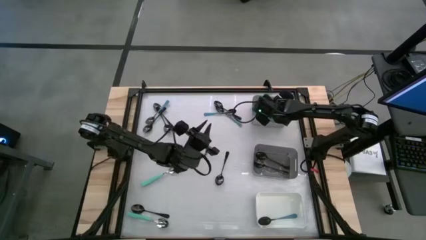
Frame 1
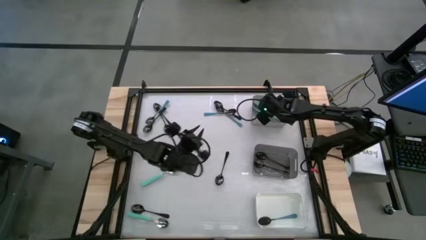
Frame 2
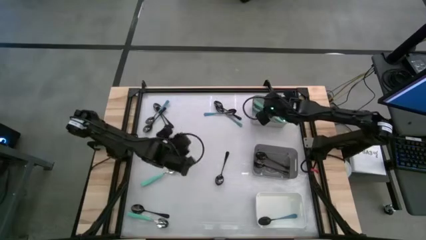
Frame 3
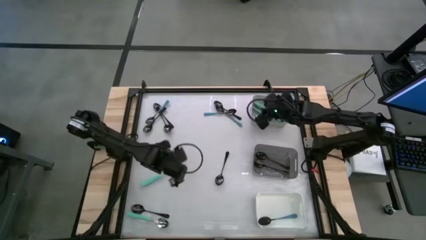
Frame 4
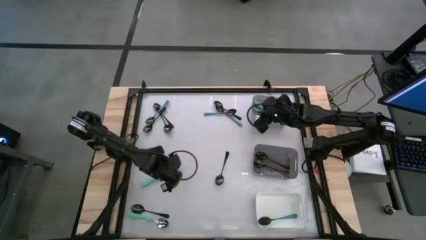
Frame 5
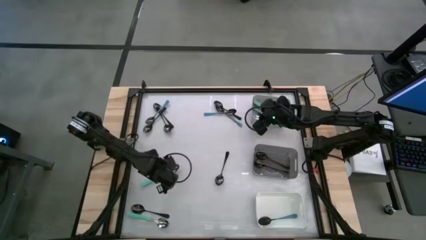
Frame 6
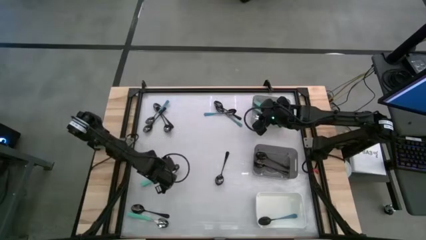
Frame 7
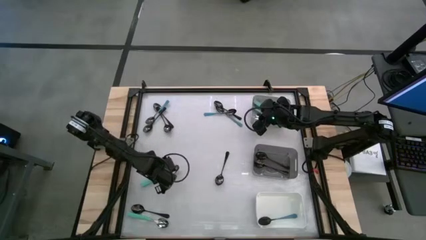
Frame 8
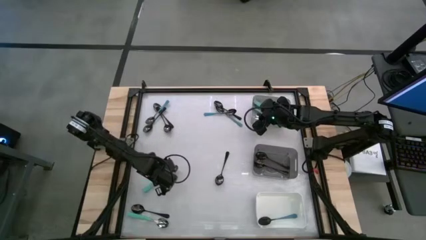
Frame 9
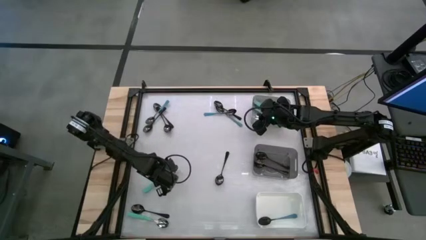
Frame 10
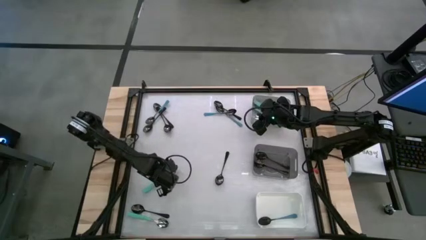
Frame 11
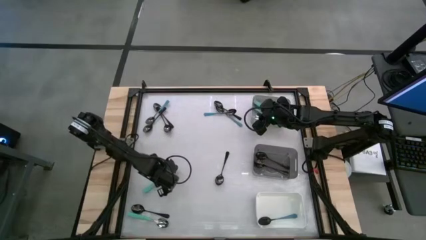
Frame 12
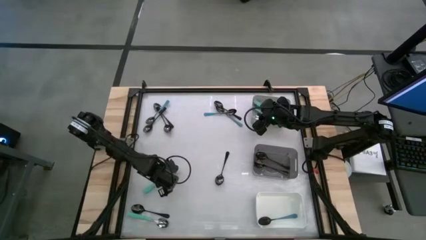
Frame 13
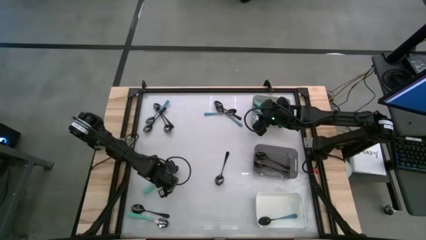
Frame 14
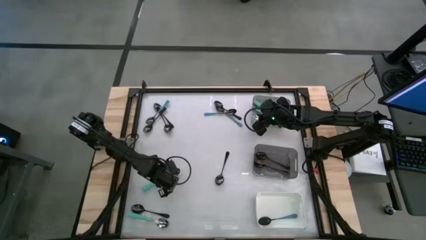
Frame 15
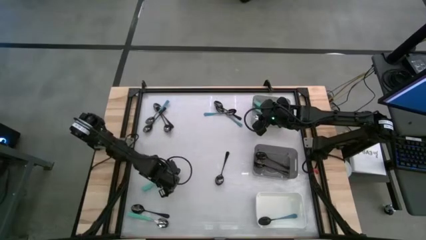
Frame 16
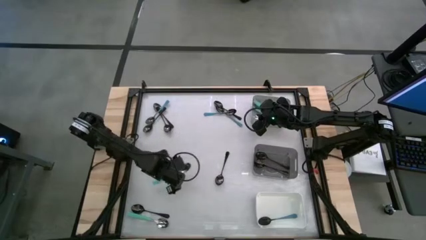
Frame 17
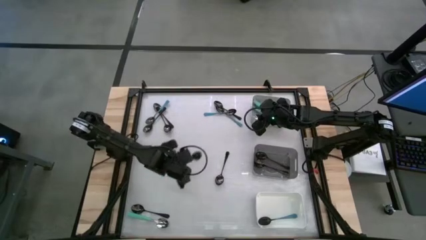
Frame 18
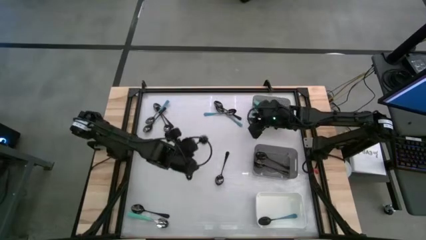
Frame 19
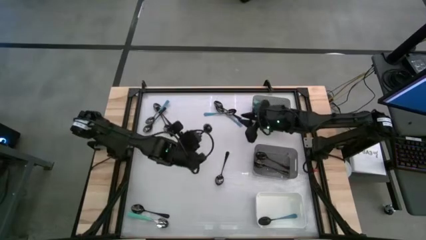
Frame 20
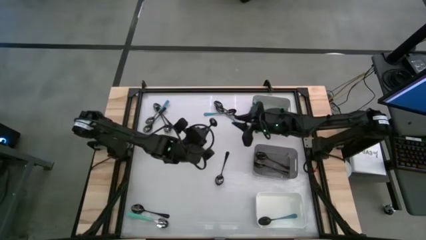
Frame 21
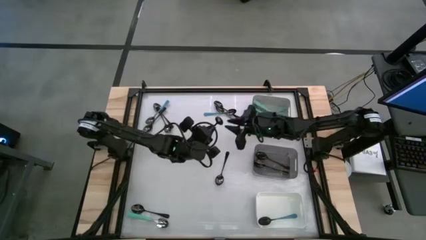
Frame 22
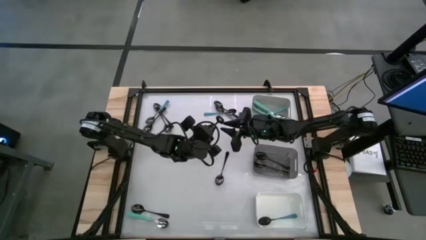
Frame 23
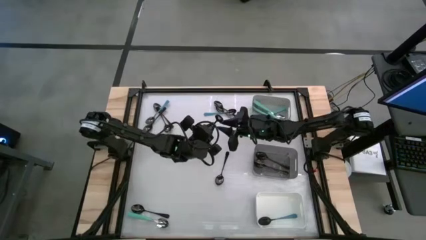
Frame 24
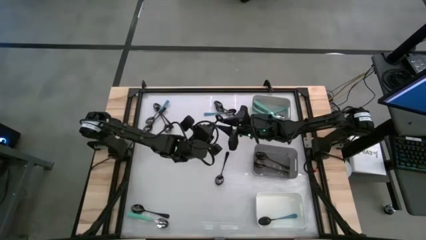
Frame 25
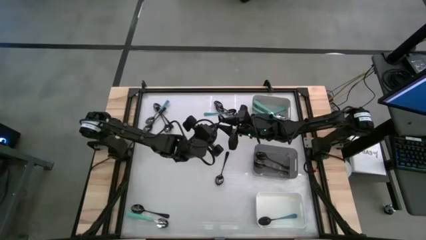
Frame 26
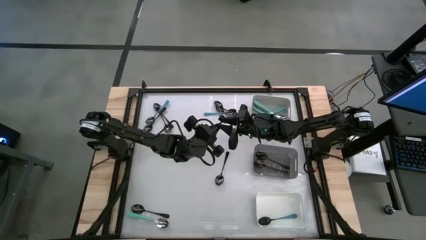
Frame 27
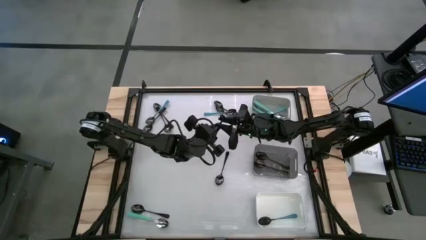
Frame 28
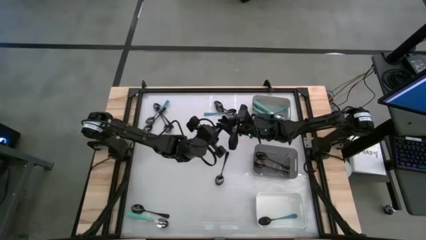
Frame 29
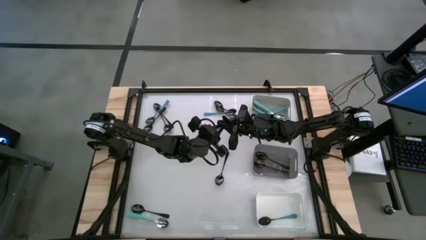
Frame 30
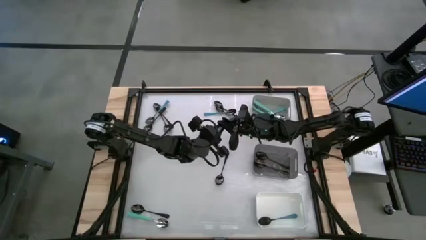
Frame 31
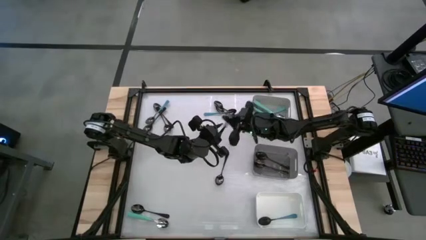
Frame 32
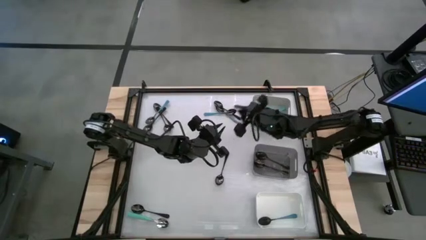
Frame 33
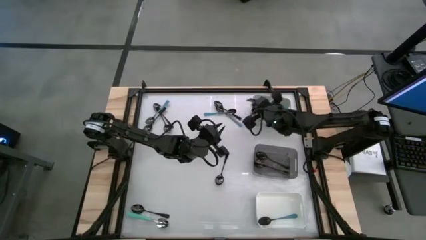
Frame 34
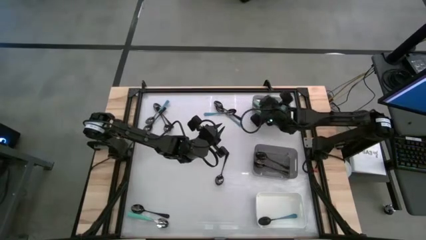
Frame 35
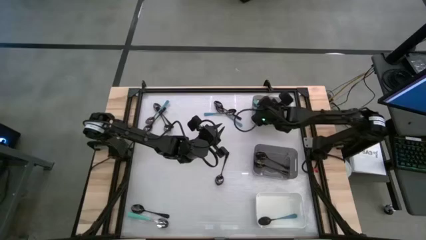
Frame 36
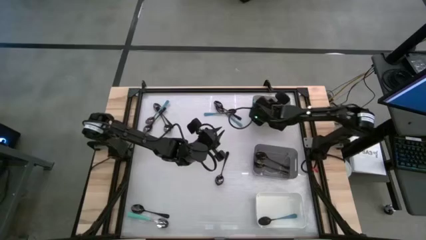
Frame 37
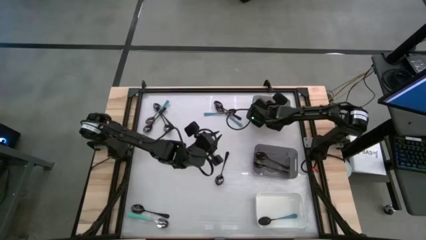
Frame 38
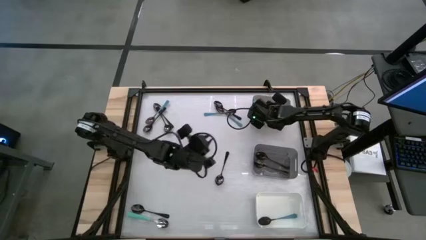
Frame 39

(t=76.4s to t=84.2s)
Task: Sort silverware by color (type)
Put the light blue spoon into the gray bin

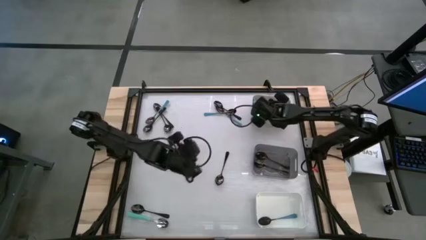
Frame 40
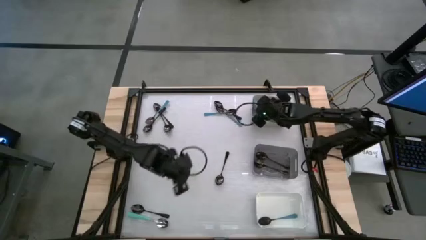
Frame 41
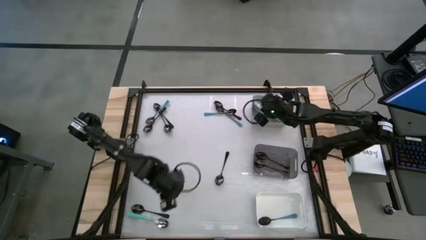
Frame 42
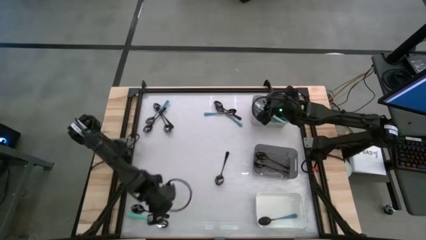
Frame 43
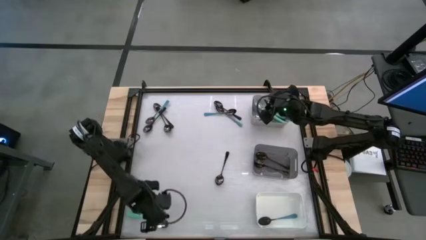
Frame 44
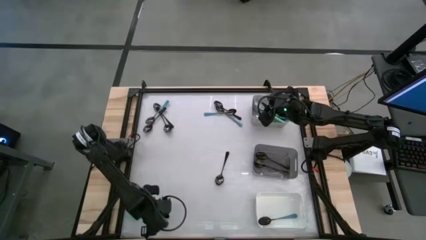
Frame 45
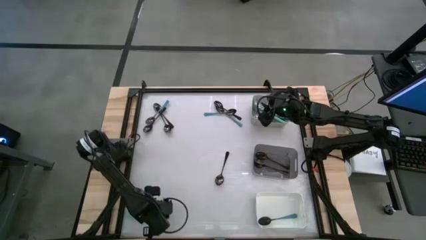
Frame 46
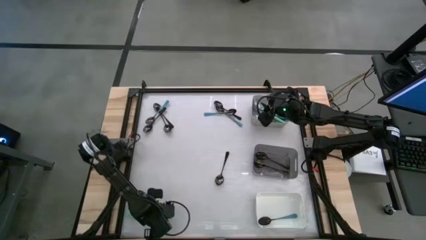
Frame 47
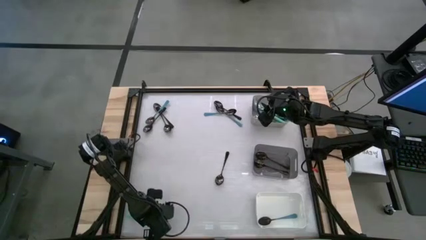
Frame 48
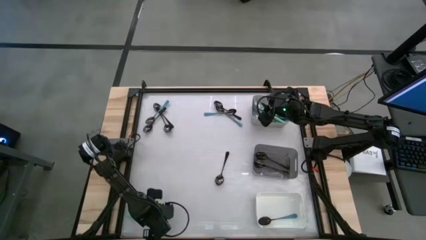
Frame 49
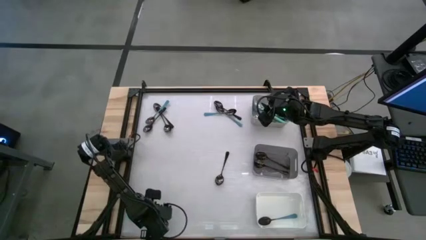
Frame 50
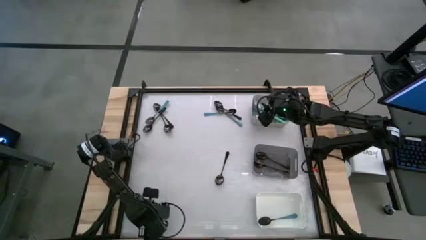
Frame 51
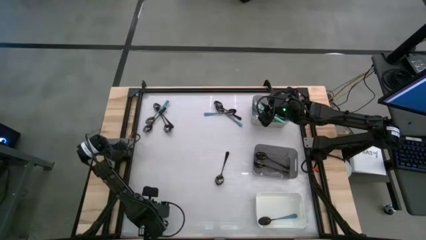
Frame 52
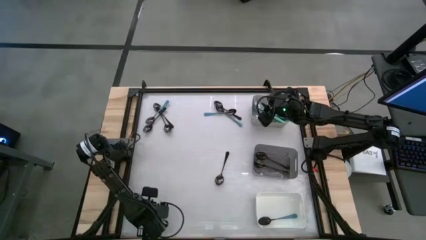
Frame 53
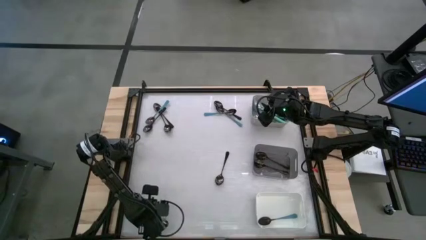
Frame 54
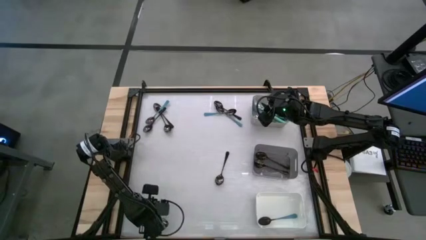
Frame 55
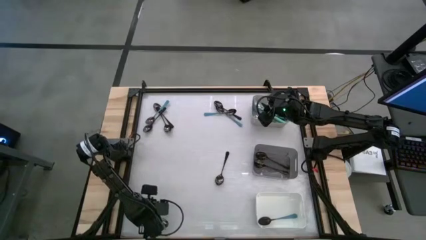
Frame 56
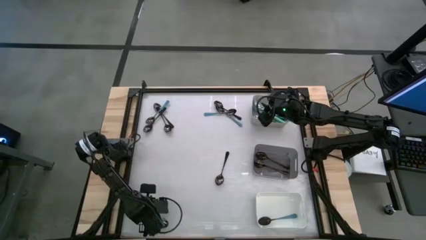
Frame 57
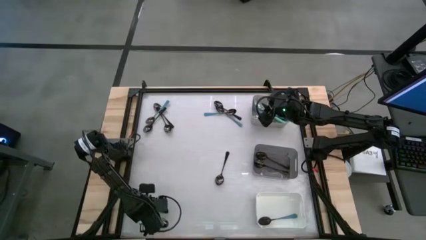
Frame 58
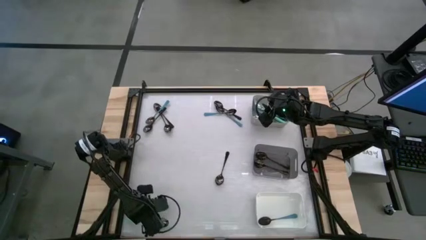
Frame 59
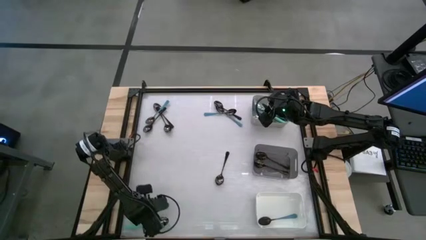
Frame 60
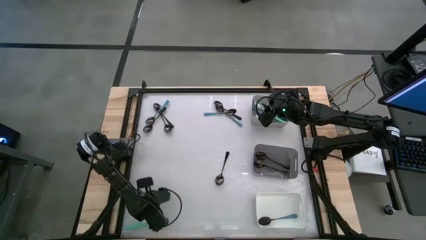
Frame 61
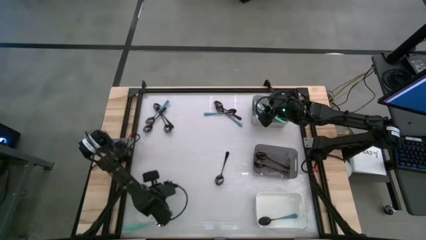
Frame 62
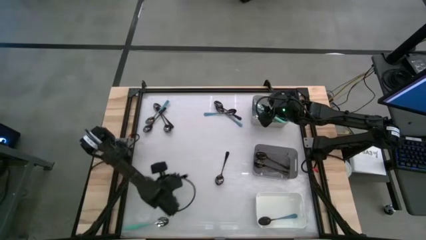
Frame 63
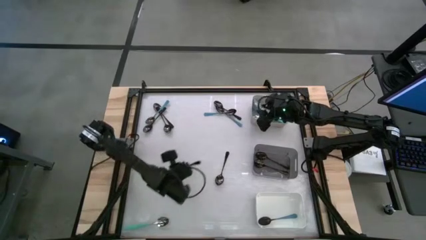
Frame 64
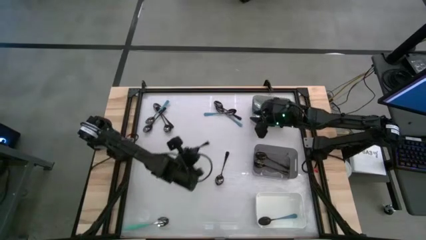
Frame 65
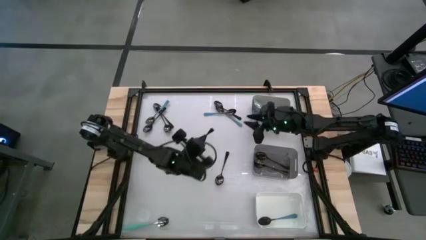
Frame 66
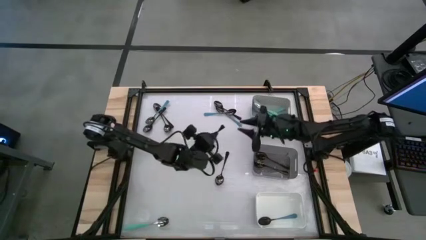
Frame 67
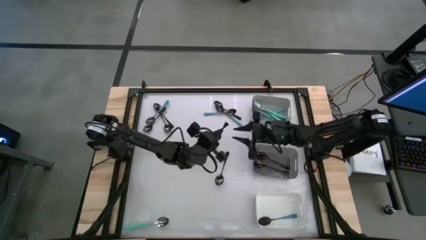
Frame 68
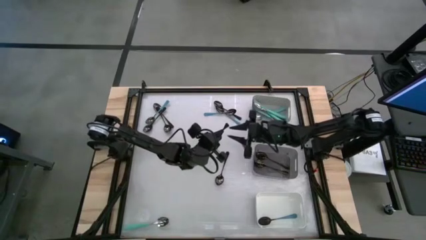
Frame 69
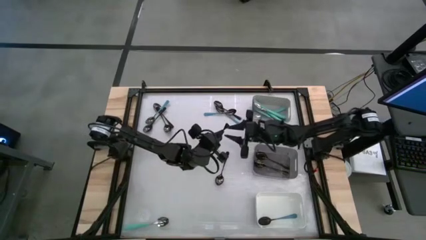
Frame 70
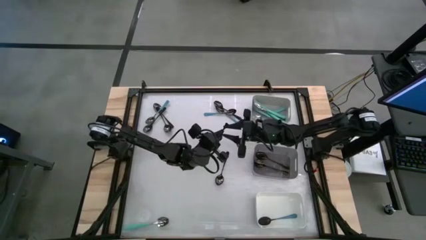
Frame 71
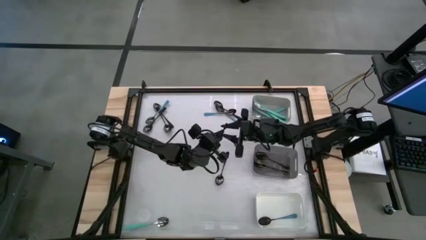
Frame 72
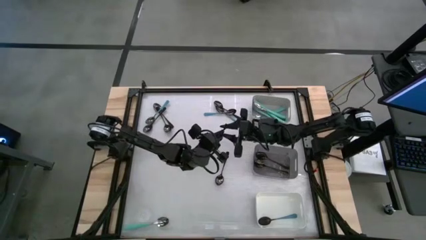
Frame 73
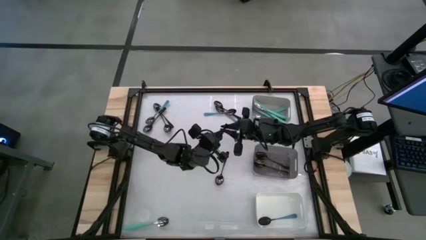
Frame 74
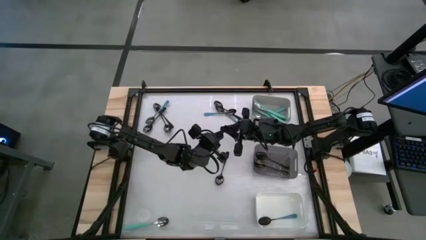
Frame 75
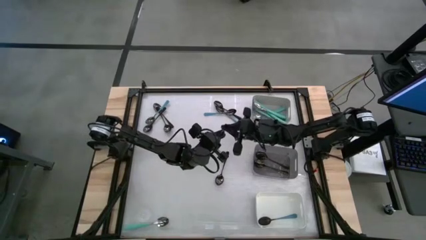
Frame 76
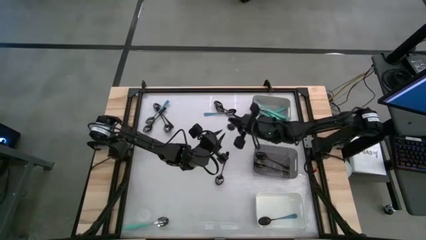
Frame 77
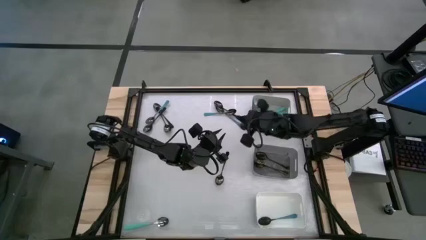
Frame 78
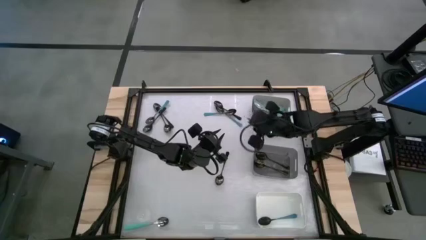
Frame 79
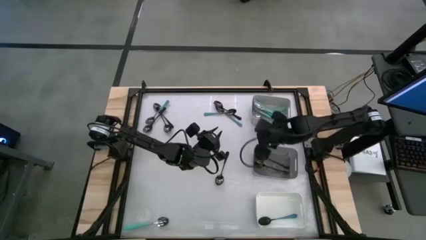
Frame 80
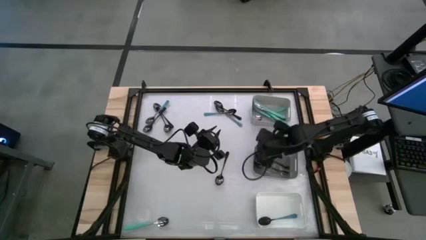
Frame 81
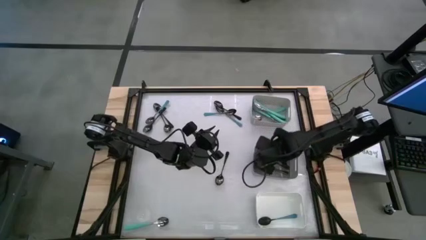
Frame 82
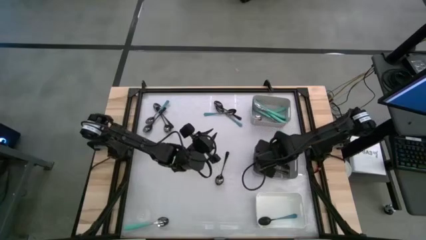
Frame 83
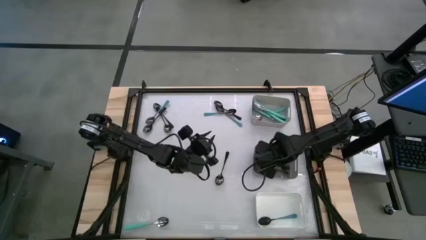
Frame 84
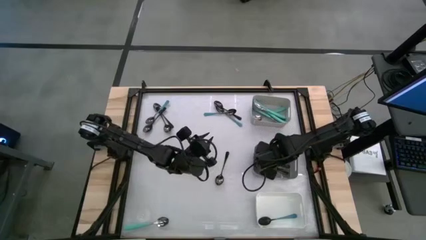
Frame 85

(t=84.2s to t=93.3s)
Put the black spoon into the black bin

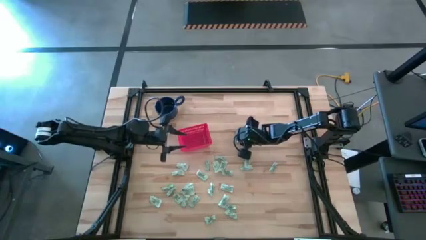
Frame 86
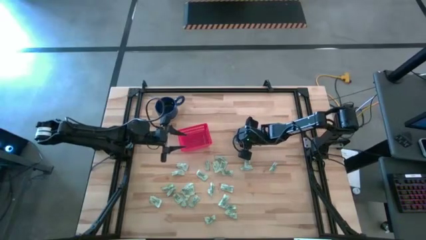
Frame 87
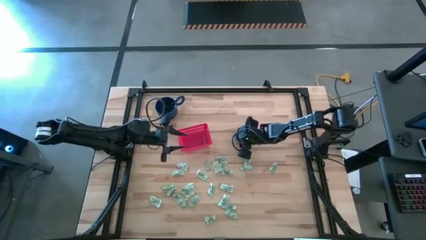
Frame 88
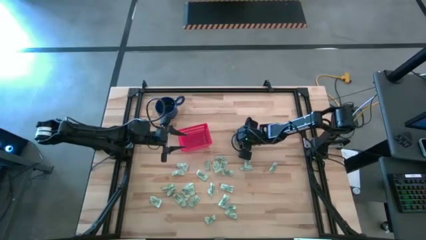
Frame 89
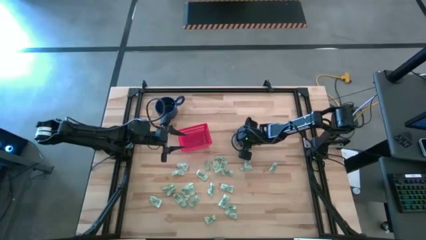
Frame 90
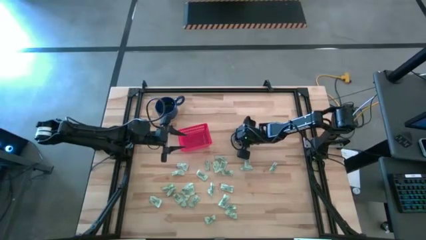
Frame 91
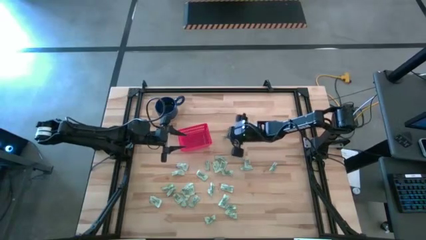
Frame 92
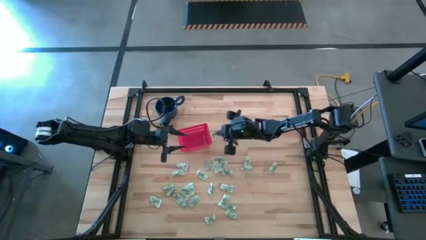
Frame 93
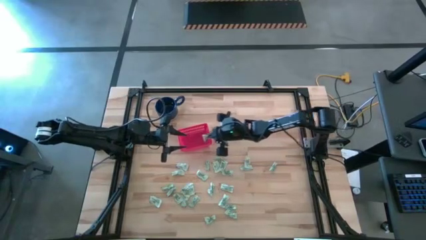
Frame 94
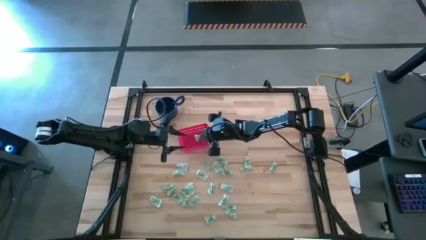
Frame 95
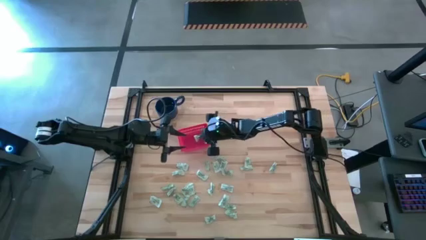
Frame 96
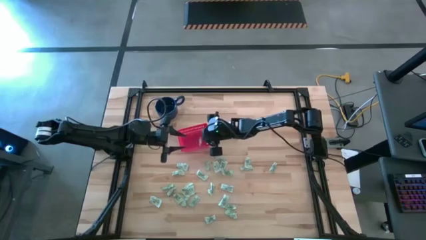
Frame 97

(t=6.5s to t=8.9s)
Task: Pick and place items into bin
Put the green stevia packet into the red bin
